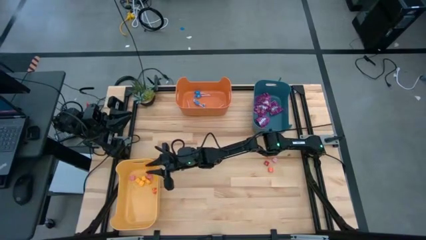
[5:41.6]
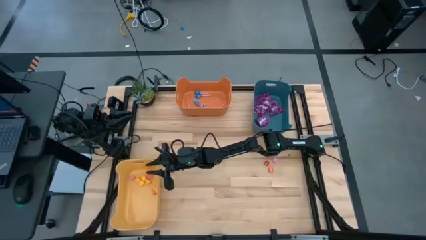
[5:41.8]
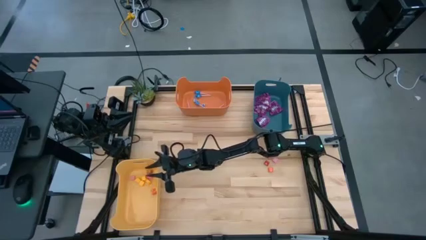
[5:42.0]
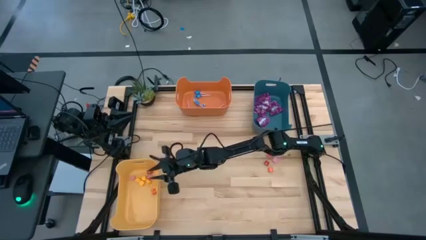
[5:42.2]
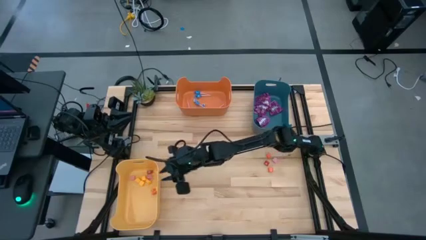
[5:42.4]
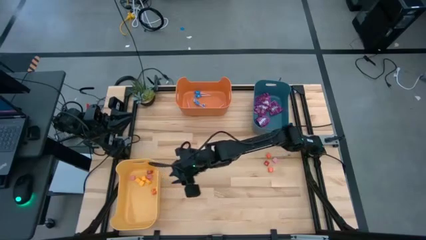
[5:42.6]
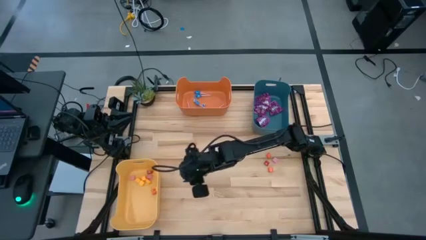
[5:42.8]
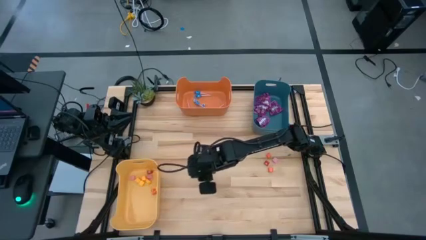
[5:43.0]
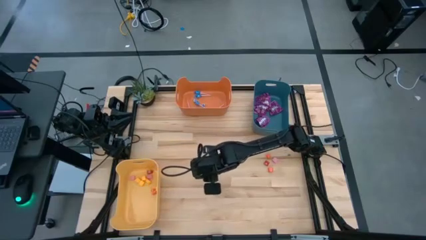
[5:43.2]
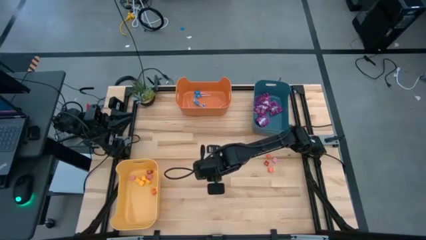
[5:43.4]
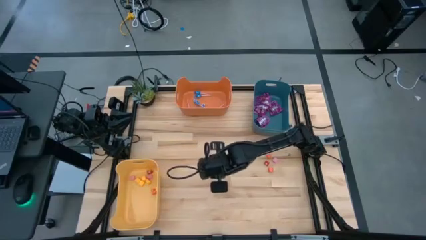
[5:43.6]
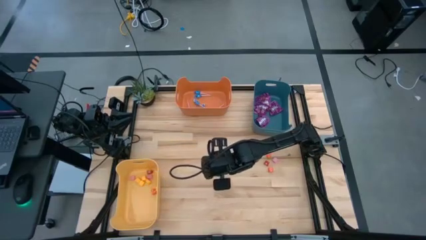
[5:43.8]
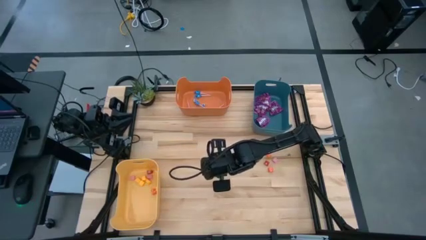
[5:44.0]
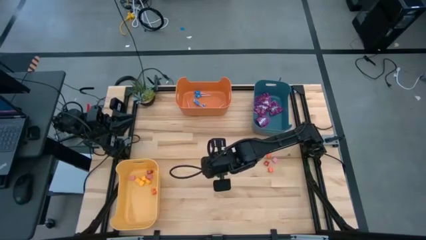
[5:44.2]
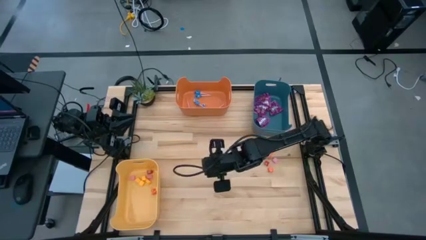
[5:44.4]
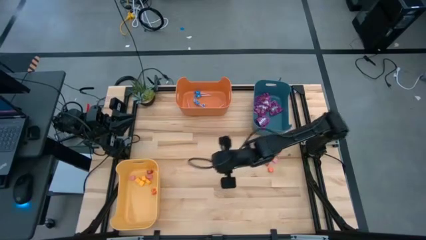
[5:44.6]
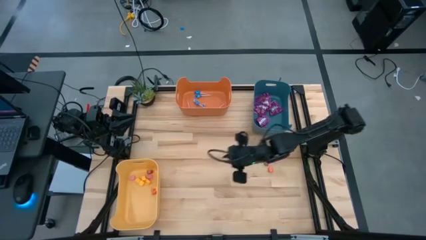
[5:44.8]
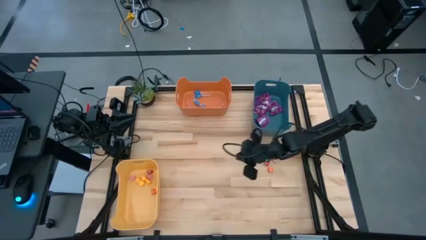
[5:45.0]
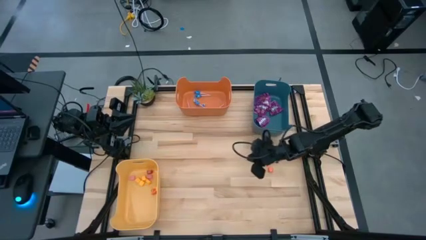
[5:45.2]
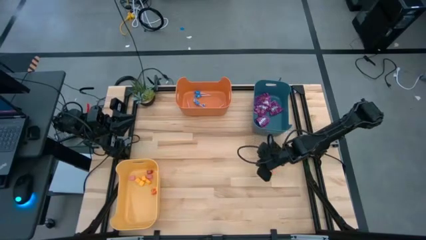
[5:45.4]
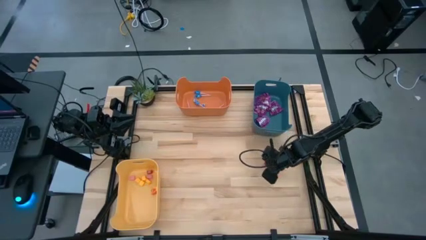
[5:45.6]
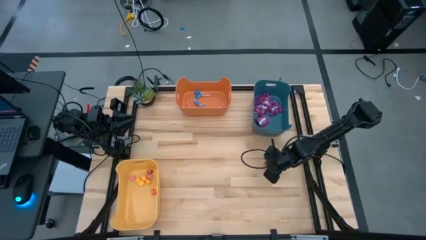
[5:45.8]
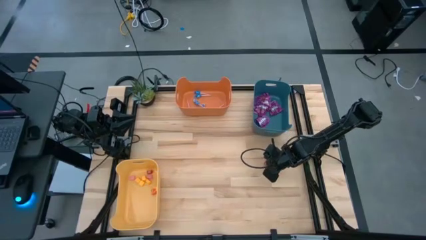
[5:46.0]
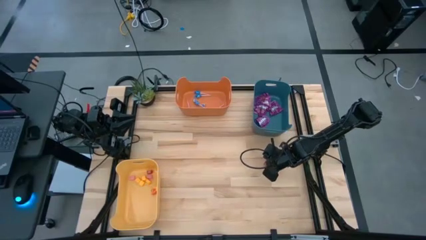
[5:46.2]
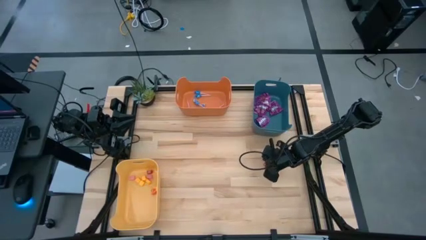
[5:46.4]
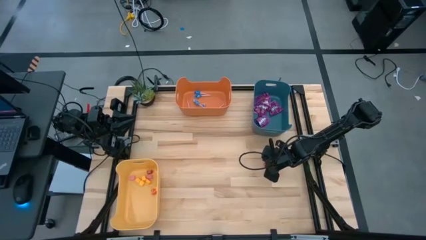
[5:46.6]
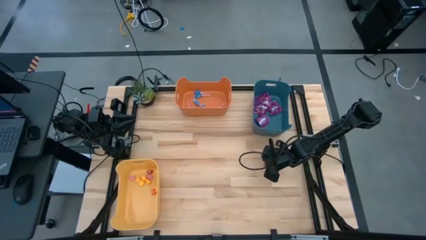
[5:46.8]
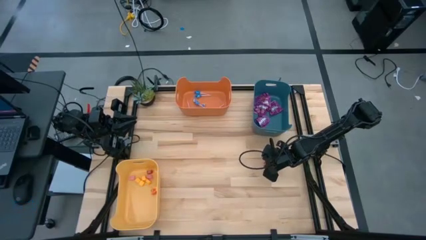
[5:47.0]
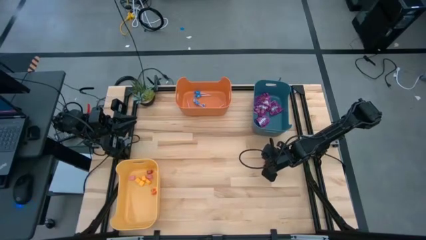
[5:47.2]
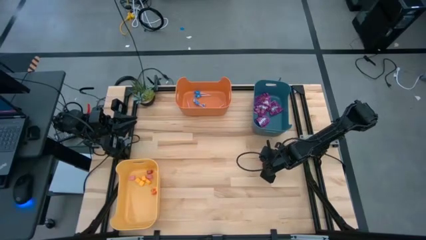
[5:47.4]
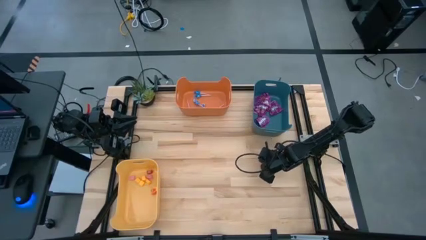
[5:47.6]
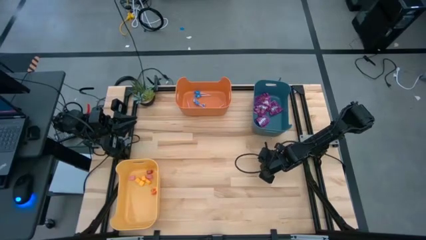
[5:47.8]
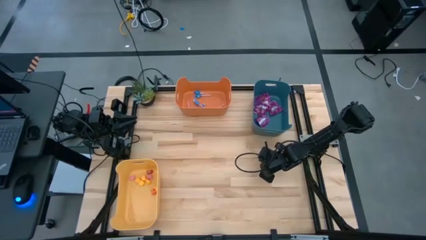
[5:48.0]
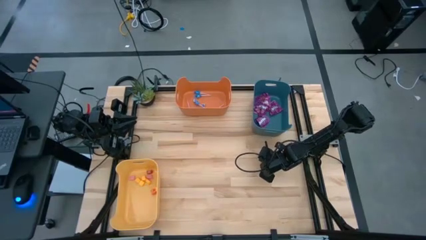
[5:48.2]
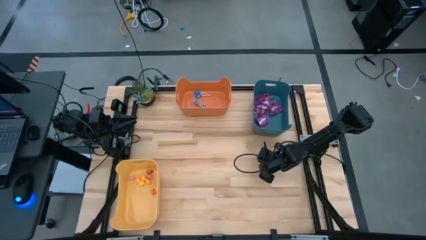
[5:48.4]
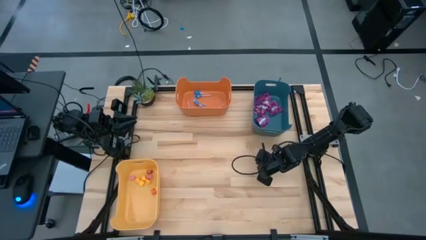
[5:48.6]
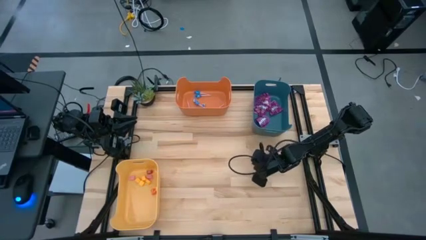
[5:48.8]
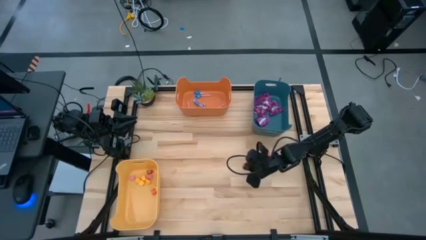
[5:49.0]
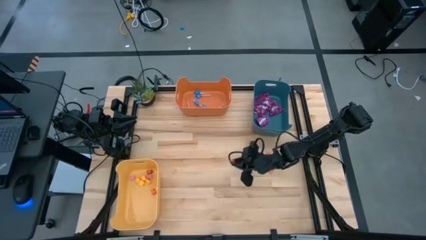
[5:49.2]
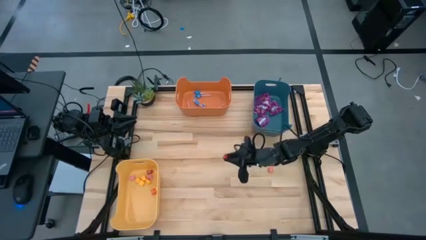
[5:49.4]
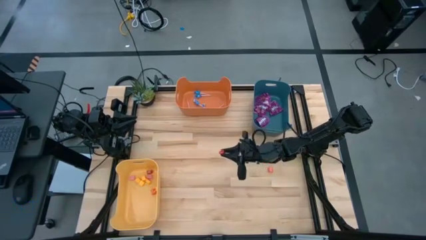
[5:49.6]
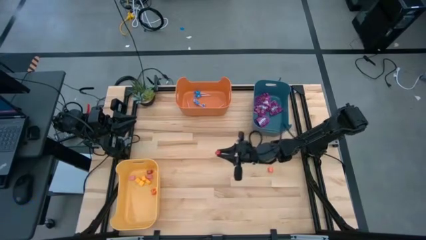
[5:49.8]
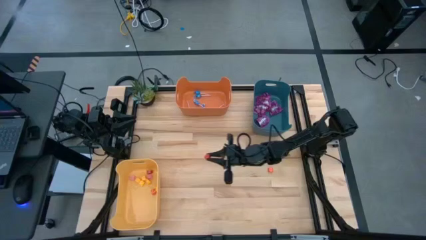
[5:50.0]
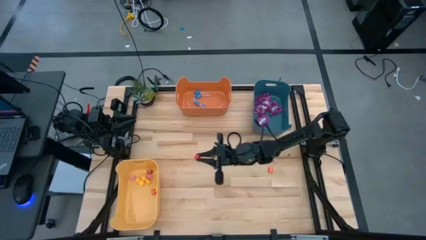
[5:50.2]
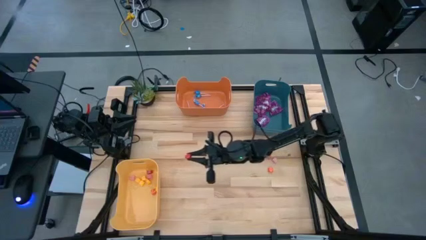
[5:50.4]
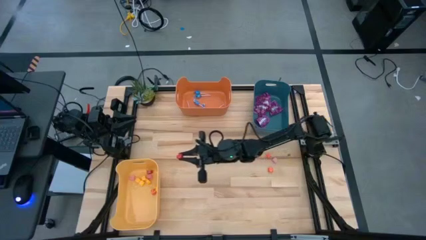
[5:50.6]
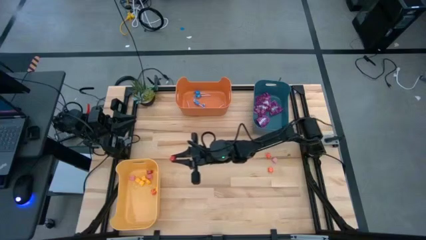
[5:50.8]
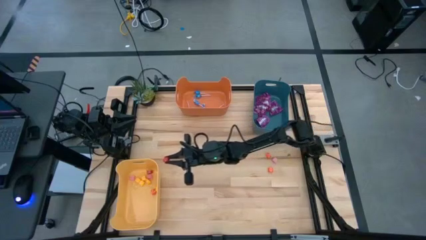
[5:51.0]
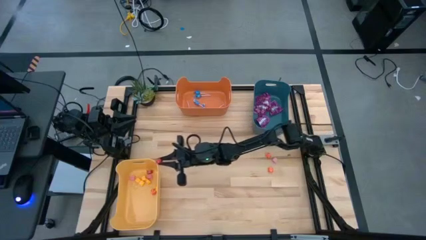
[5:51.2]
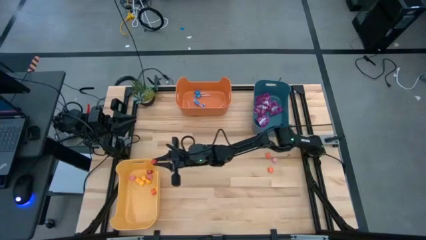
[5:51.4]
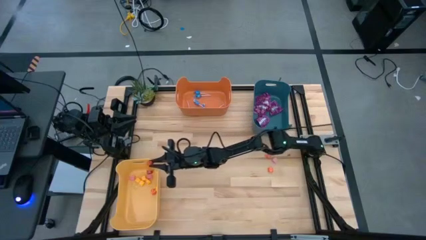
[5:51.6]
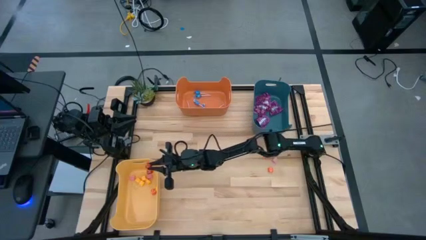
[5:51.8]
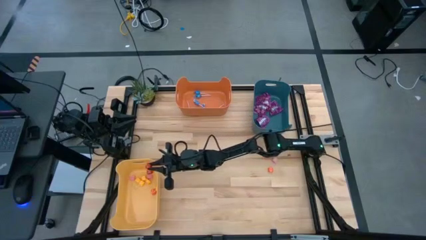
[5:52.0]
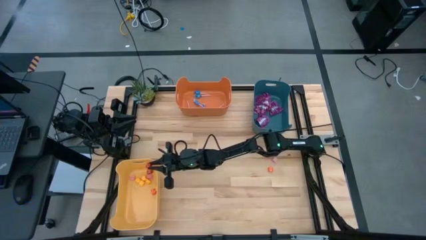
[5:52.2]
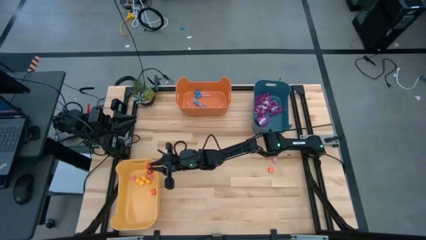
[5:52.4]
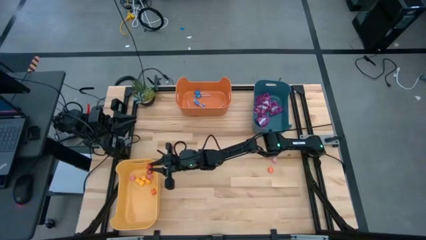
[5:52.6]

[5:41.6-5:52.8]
Task: Sort candy
Put the red candy into the yellow bin
